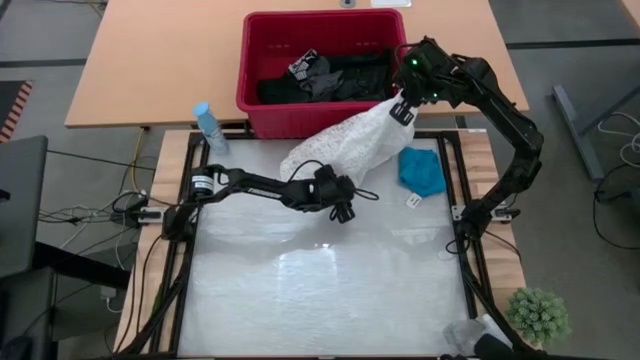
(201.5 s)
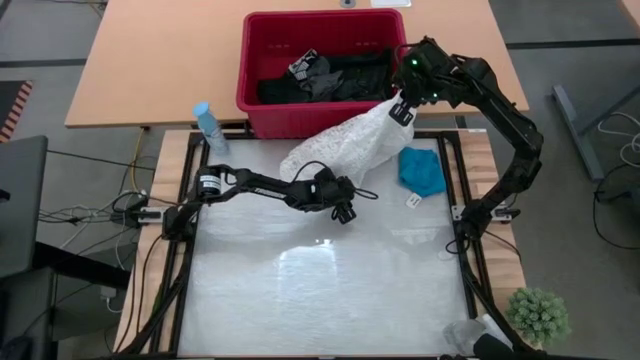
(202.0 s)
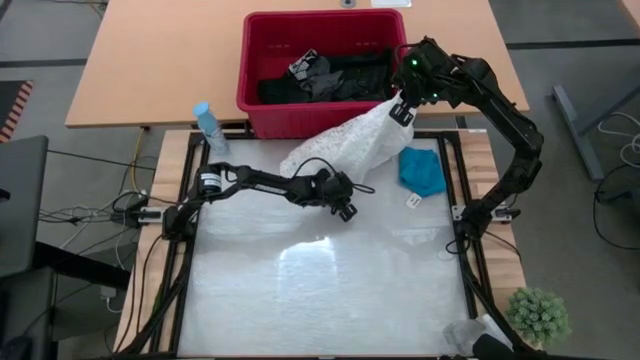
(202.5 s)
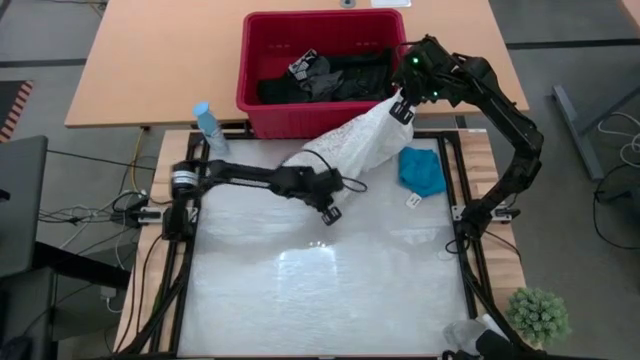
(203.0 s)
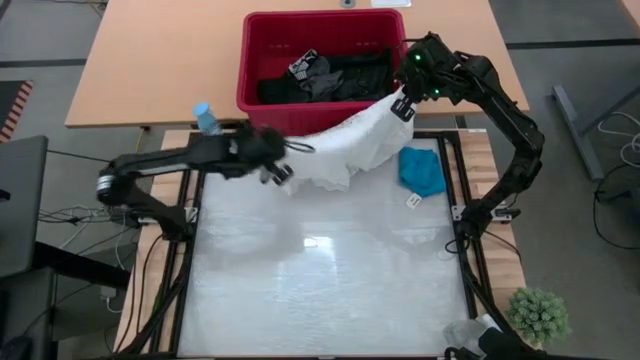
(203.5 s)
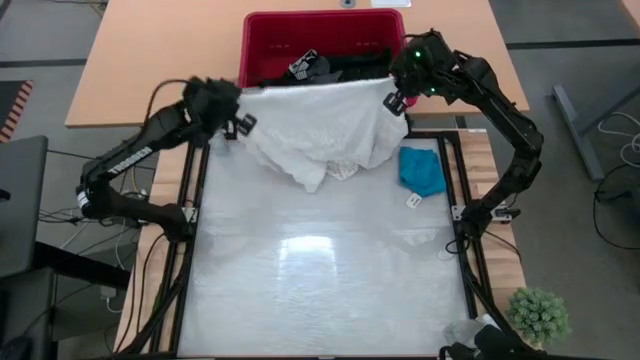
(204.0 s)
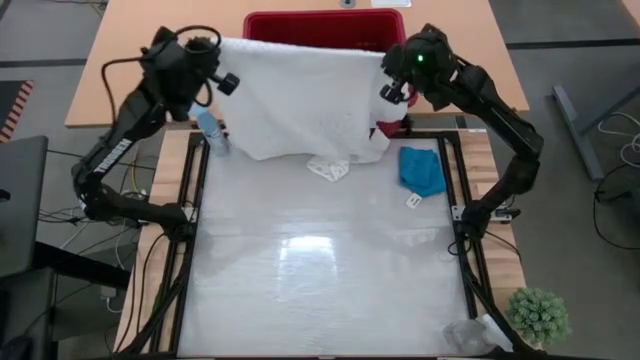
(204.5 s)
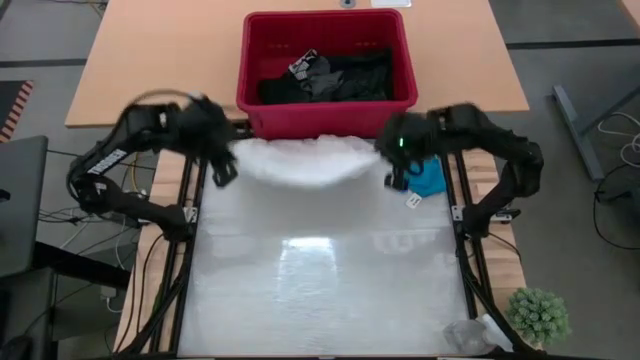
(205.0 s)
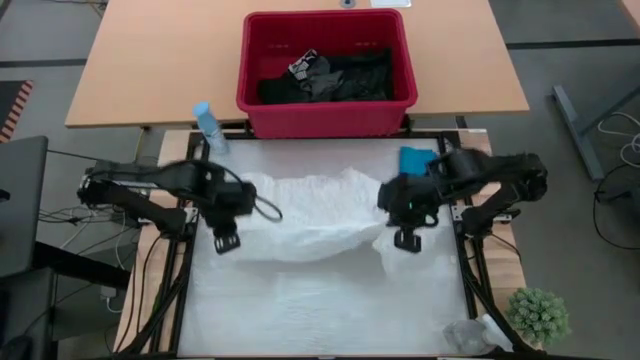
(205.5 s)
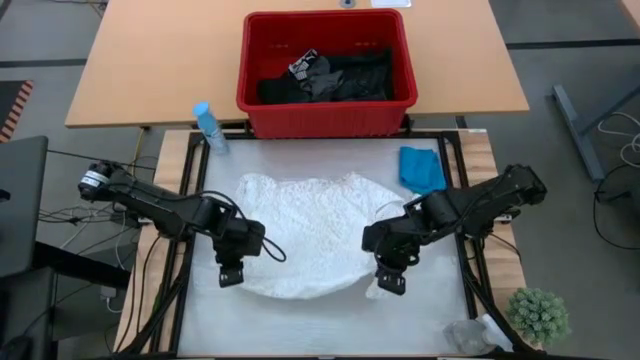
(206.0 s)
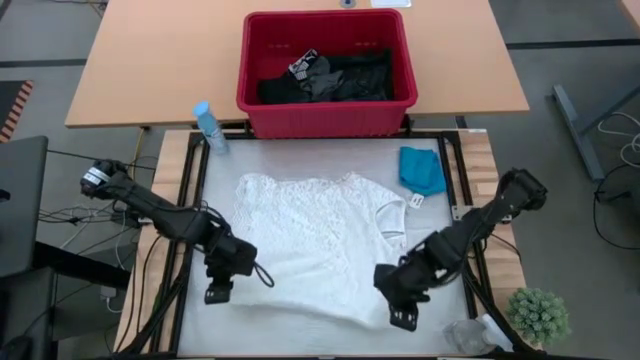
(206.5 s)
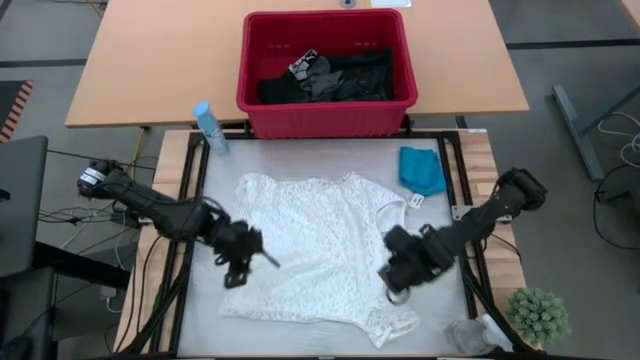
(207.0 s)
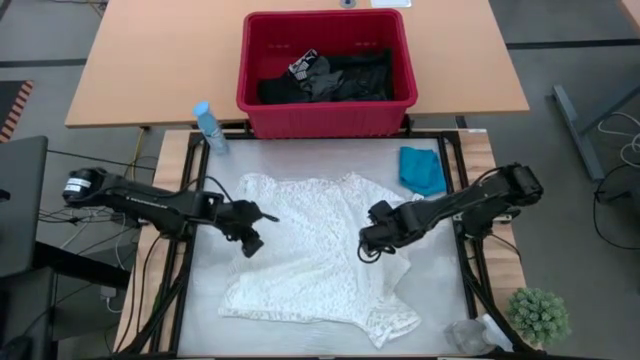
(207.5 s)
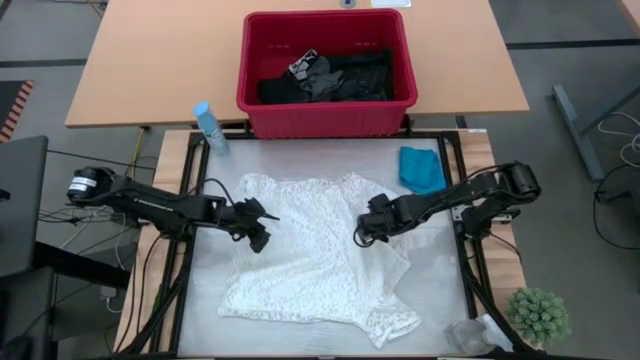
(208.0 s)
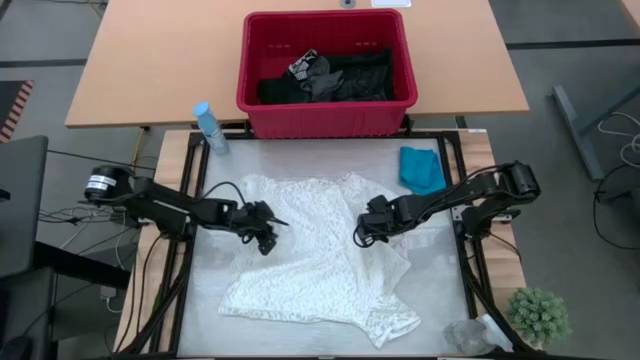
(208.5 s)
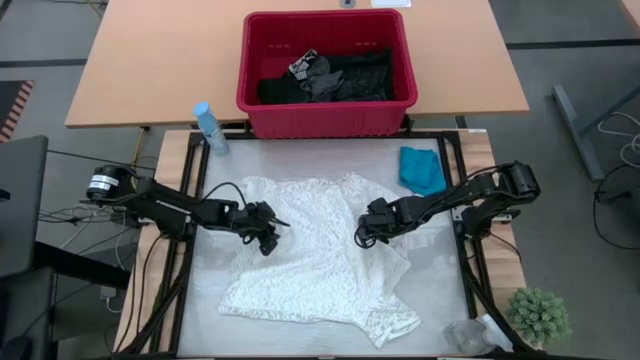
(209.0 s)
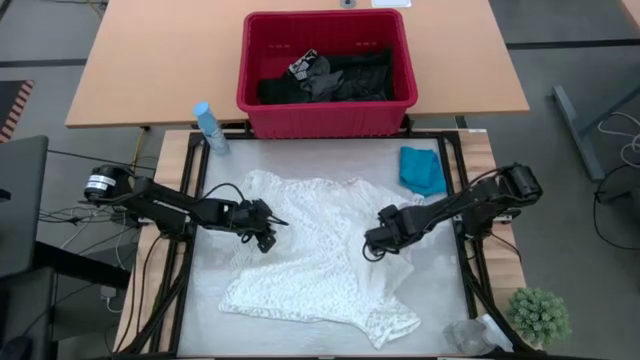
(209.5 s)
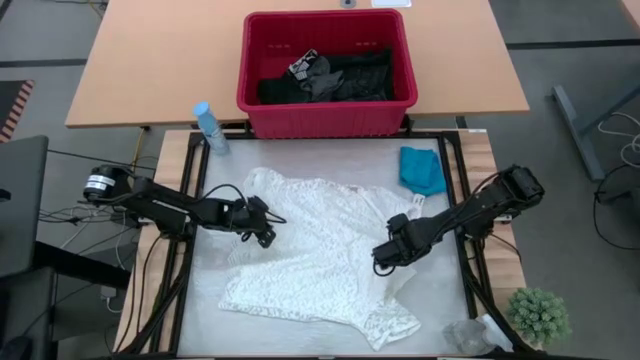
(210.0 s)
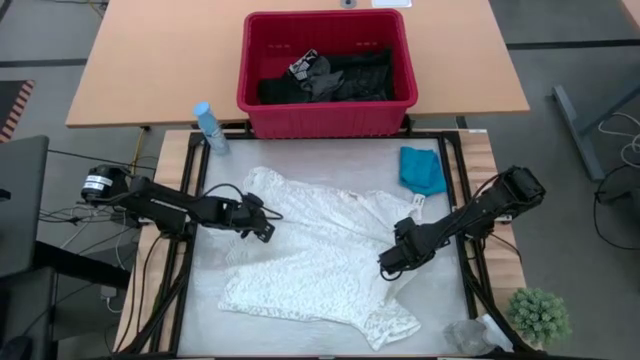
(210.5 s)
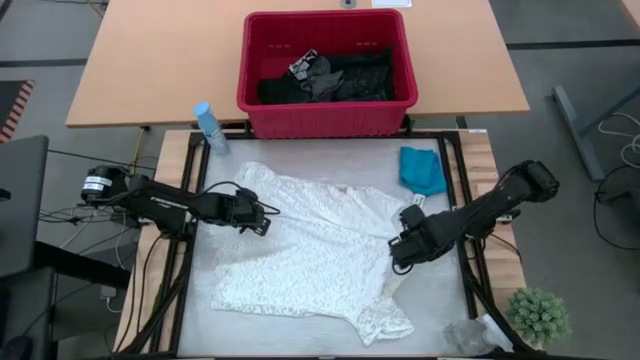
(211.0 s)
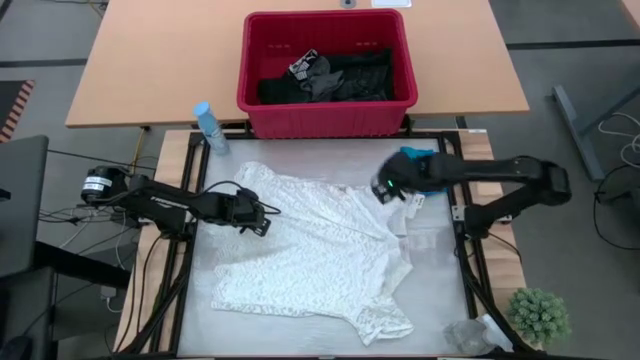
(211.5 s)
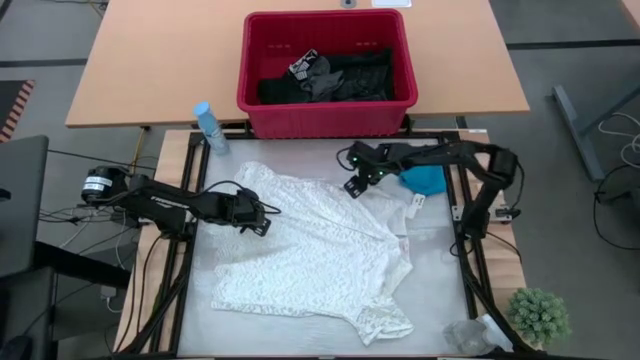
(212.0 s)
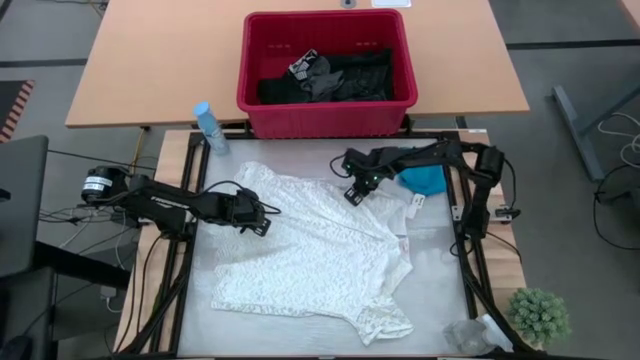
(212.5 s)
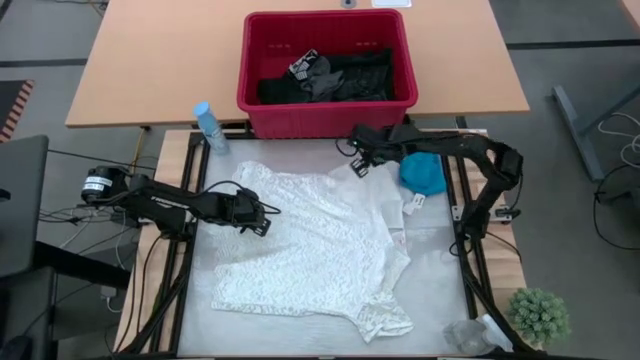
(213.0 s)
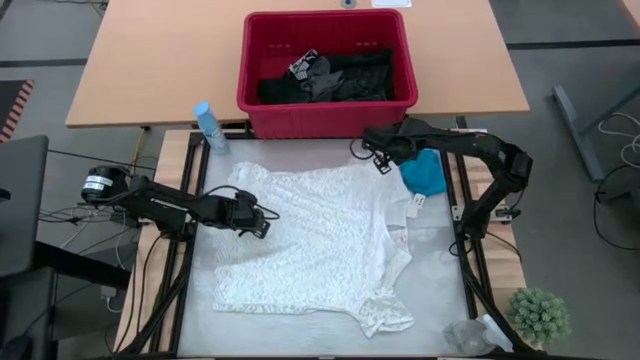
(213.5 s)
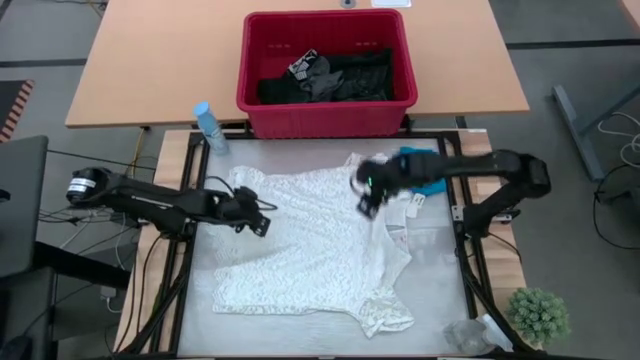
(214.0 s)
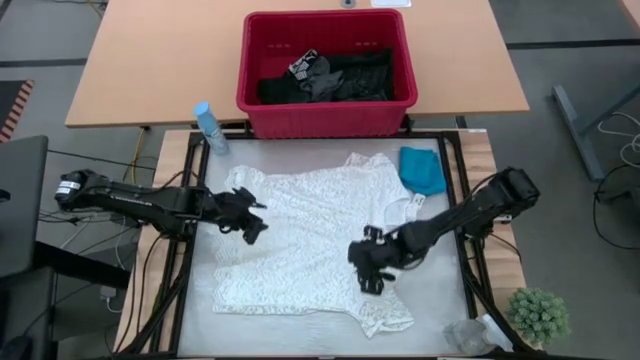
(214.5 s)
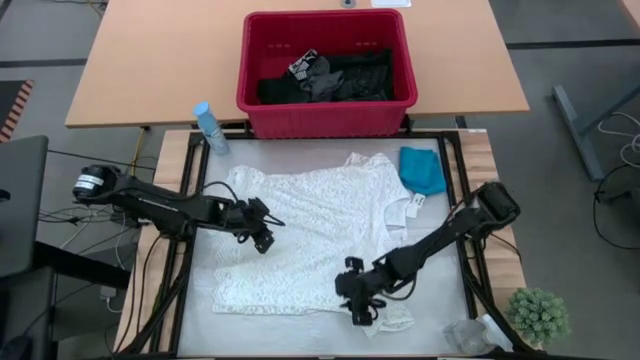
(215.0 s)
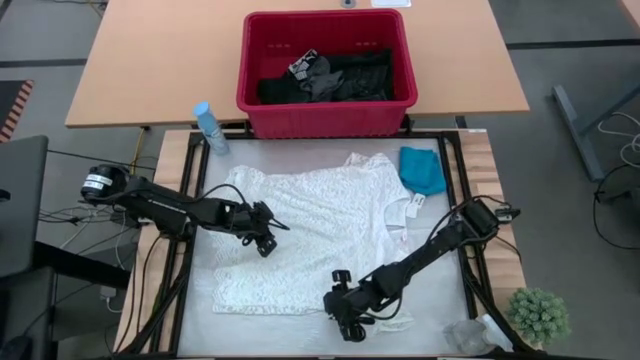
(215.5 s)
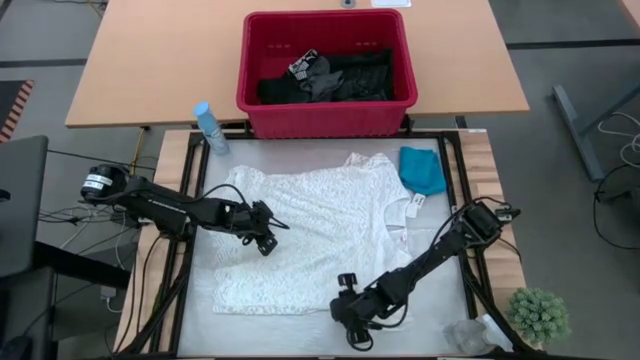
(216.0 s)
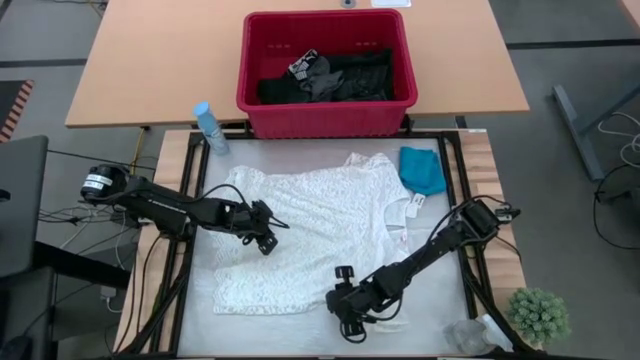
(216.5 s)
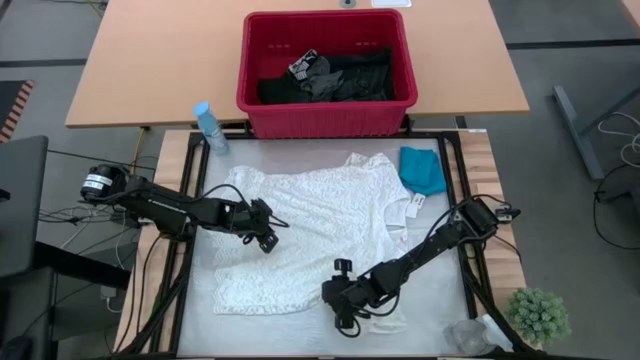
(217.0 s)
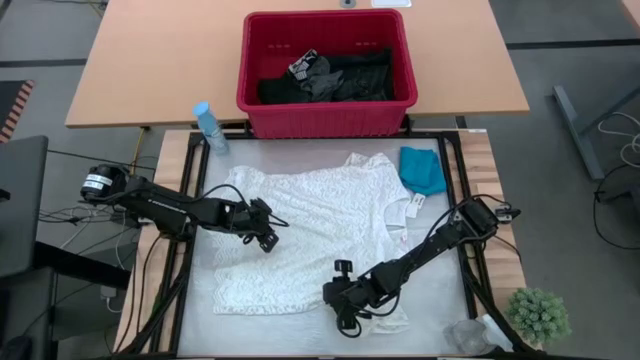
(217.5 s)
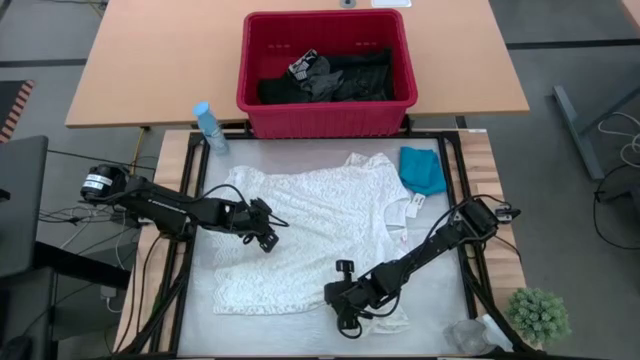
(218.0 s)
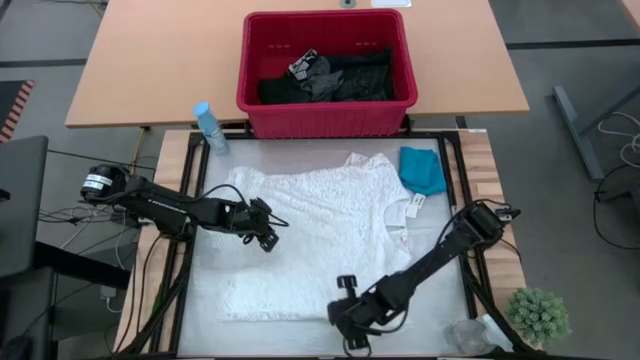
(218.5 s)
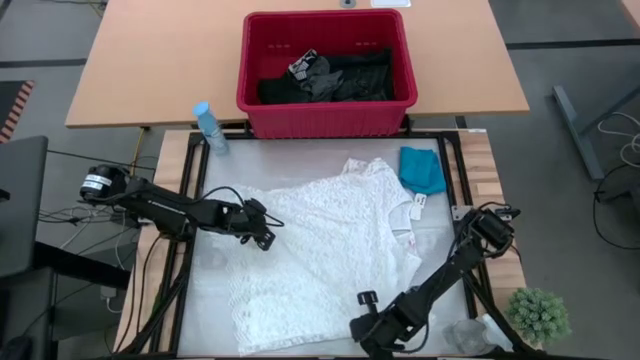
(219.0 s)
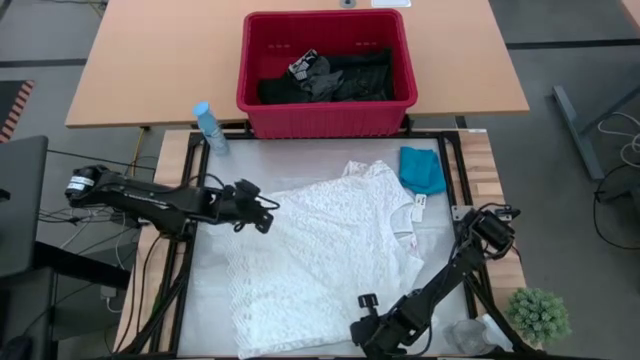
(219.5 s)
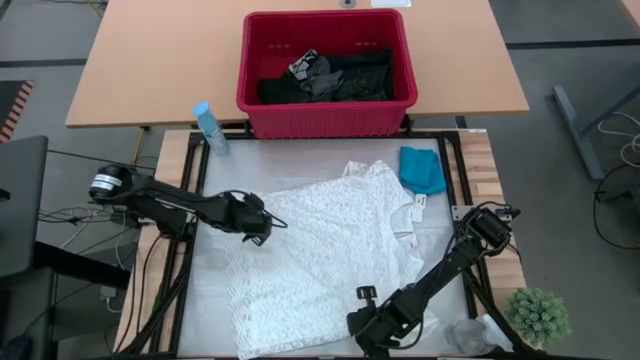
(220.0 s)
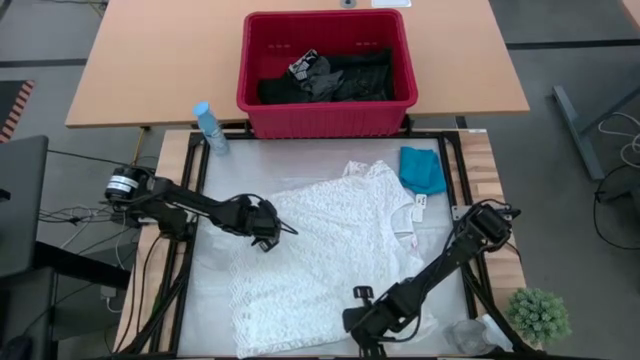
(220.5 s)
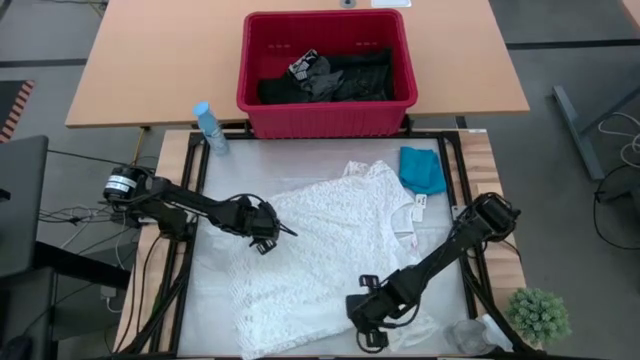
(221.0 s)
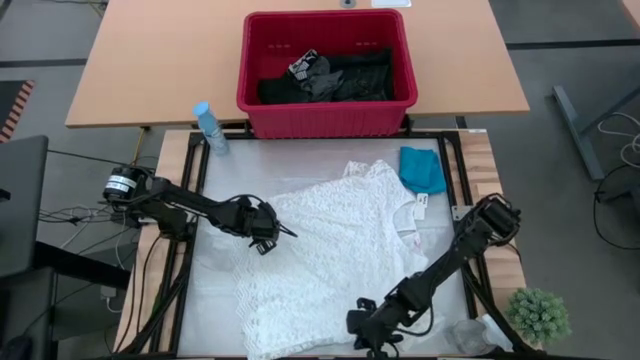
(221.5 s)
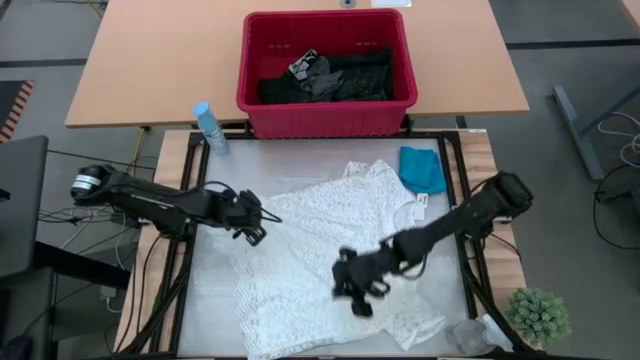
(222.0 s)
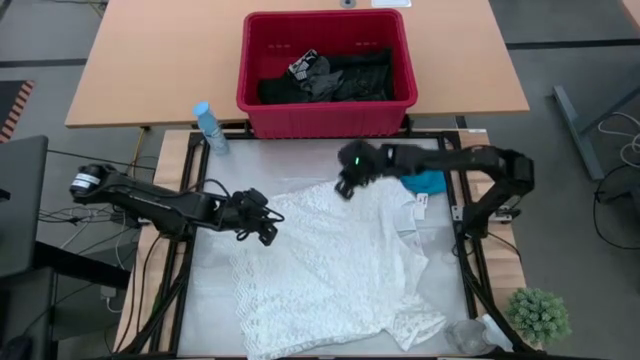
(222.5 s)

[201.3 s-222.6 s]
Task: Fold laundry
Fold the white shirt

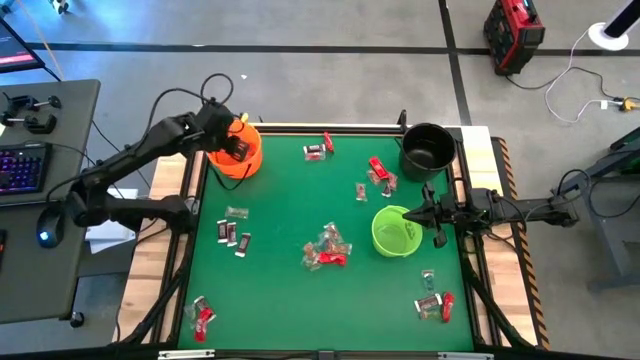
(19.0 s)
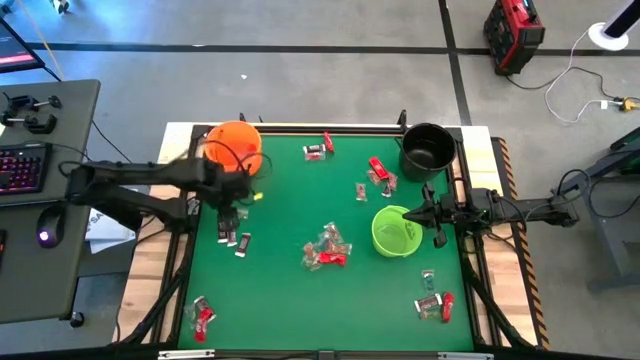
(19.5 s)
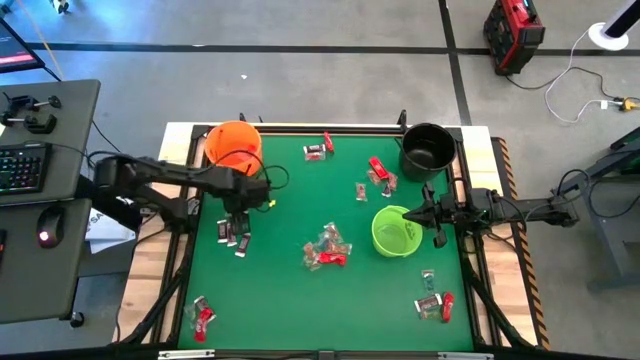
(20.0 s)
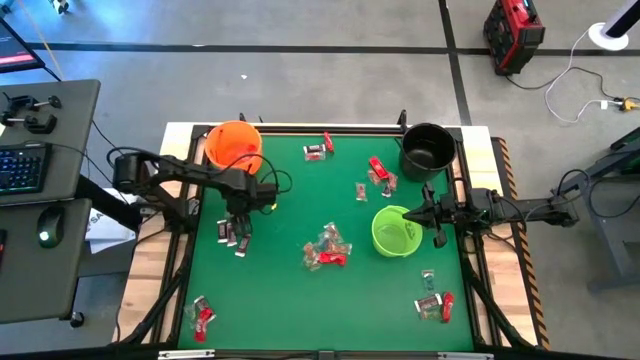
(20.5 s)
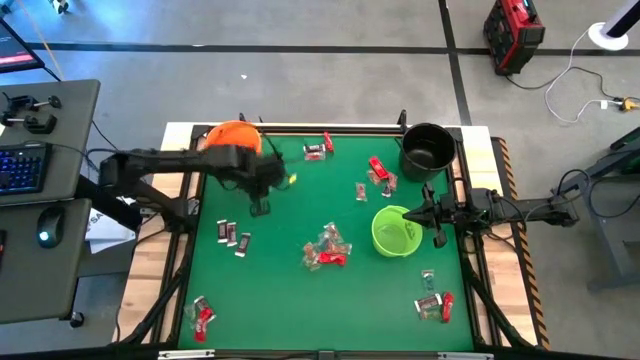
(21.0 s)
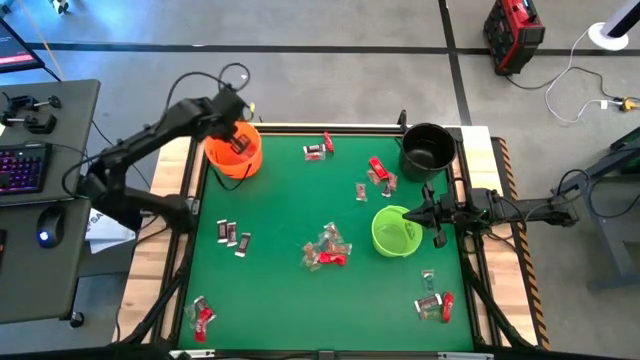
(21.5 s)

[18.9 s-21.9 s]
Task: Sort candy by brand, put in halloween buckets
Put the green gummy into the orange bucket
